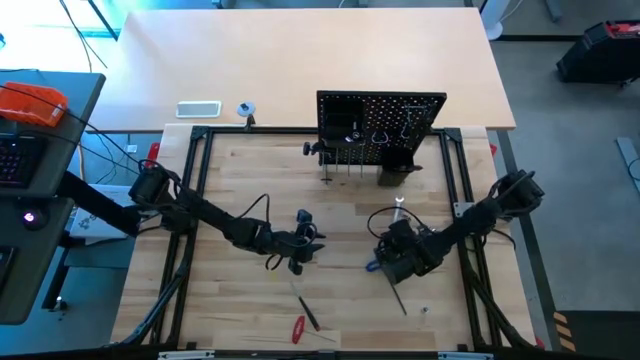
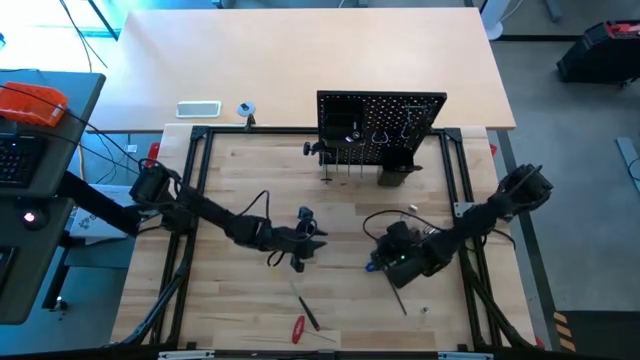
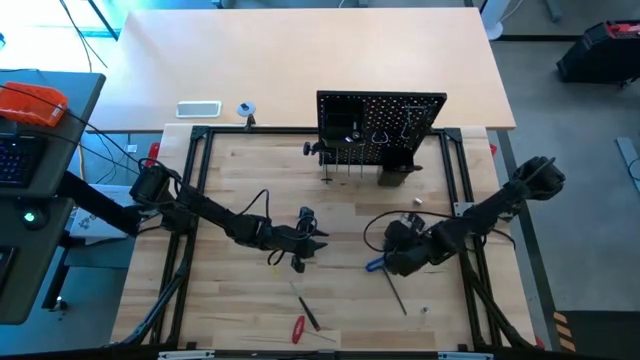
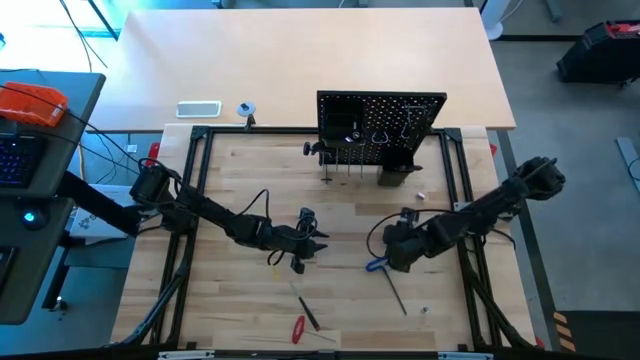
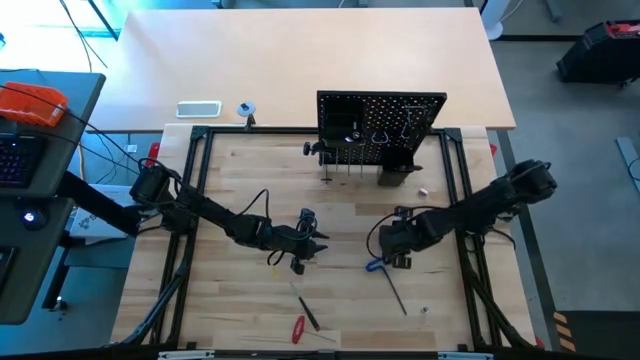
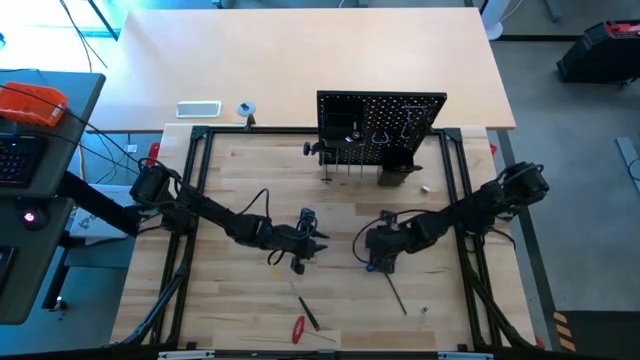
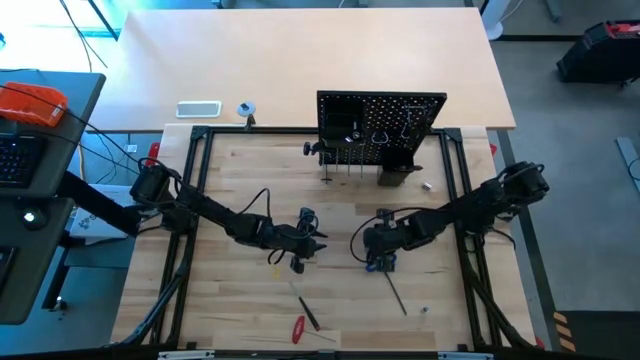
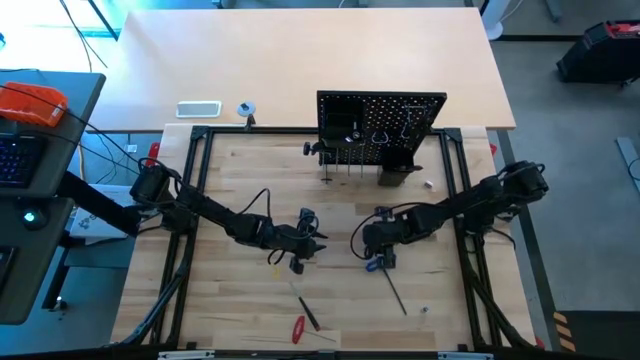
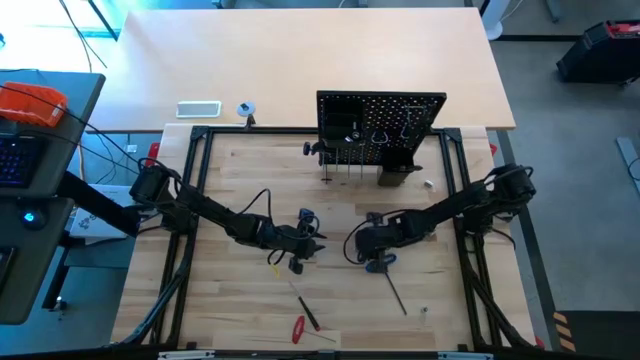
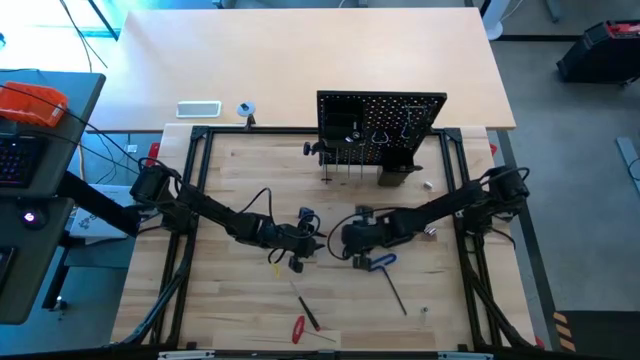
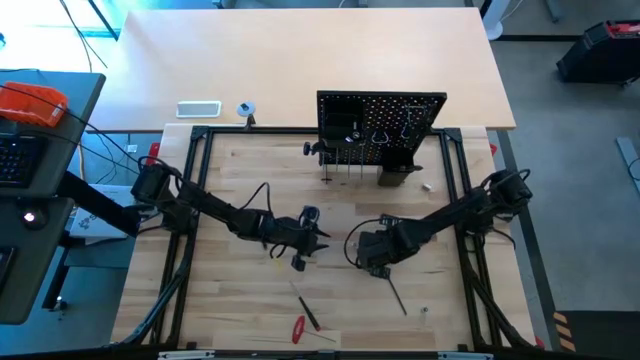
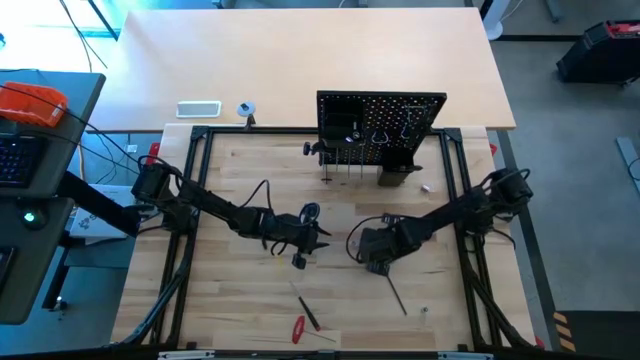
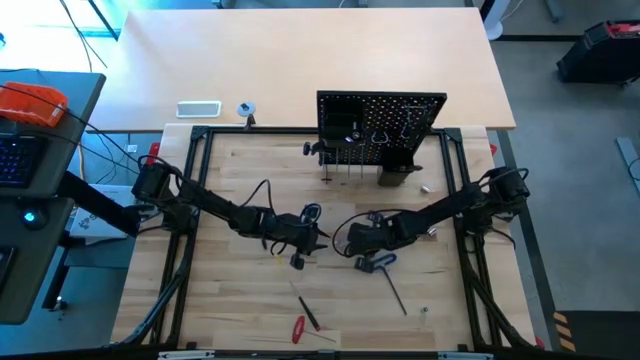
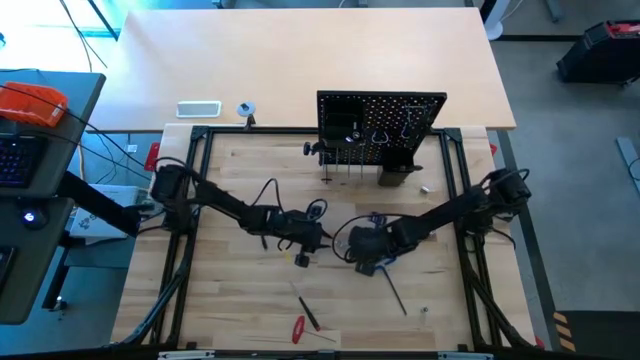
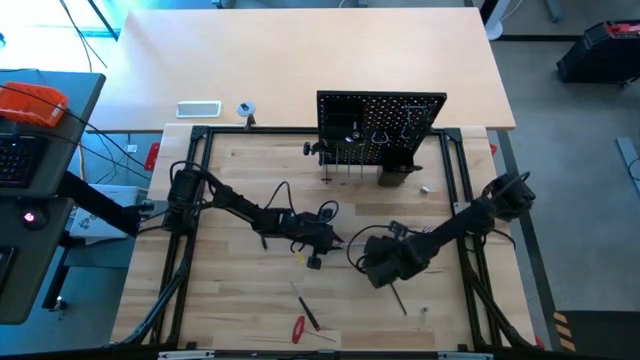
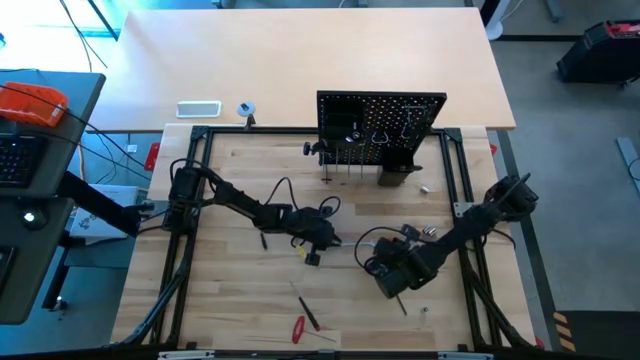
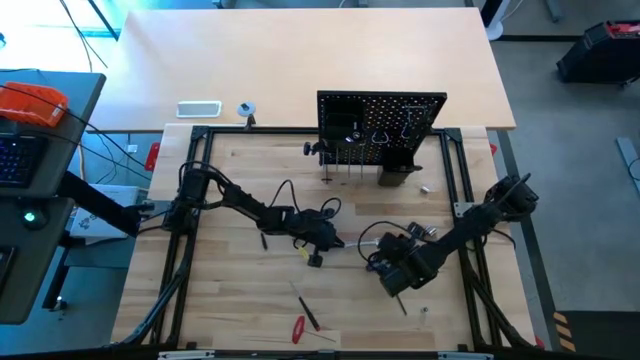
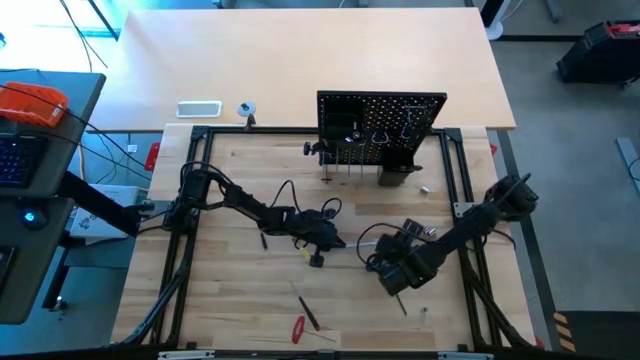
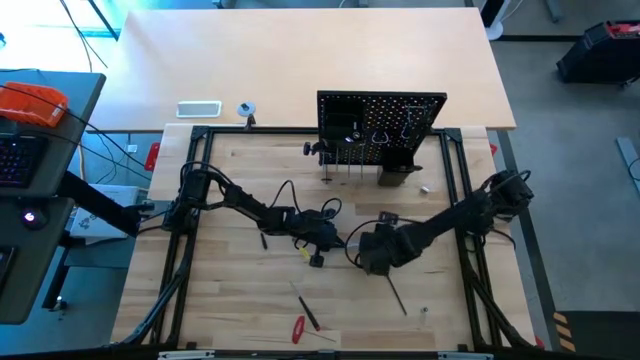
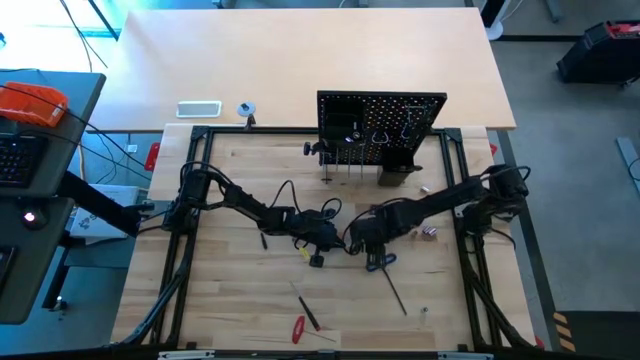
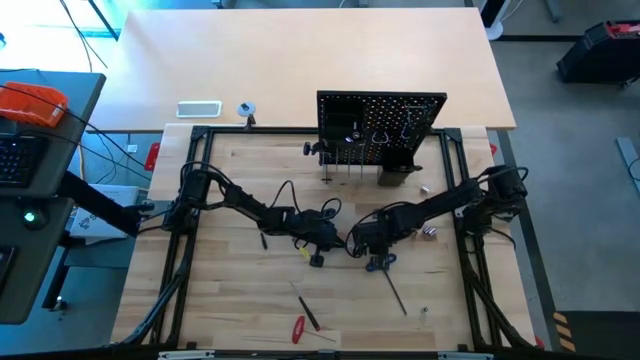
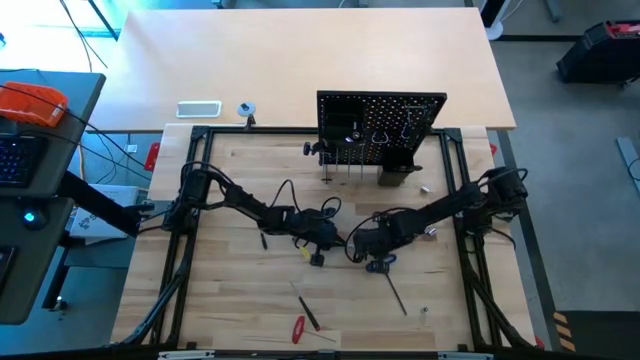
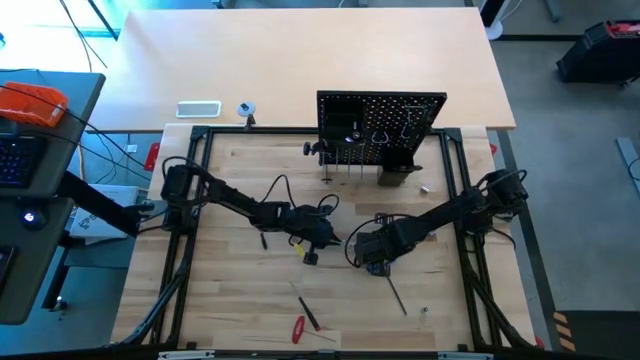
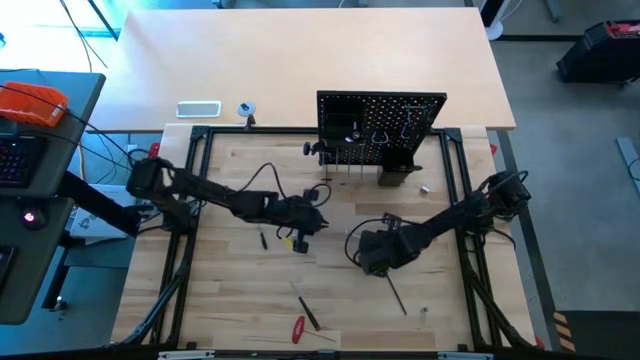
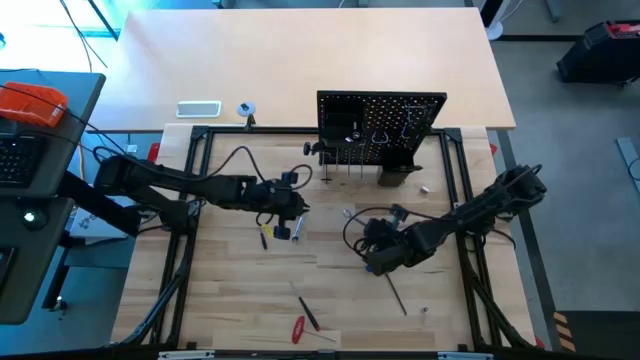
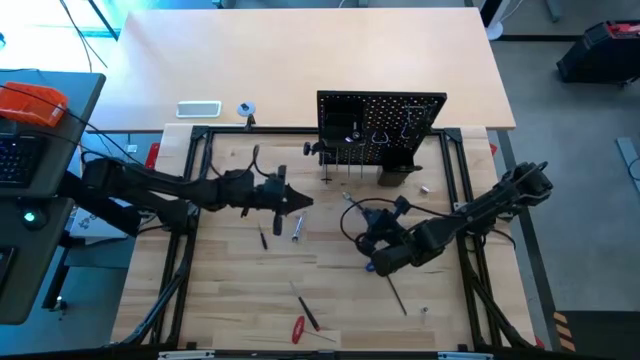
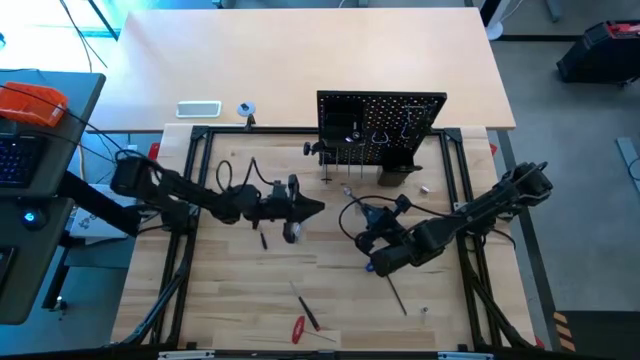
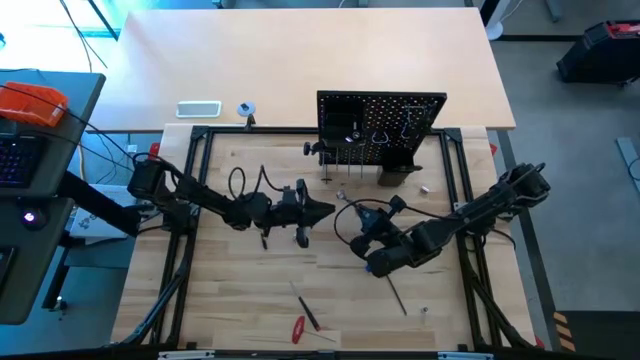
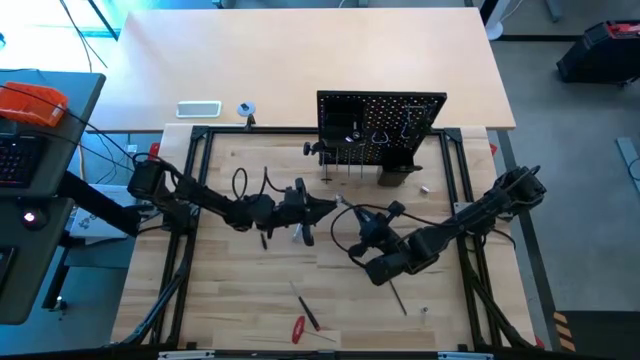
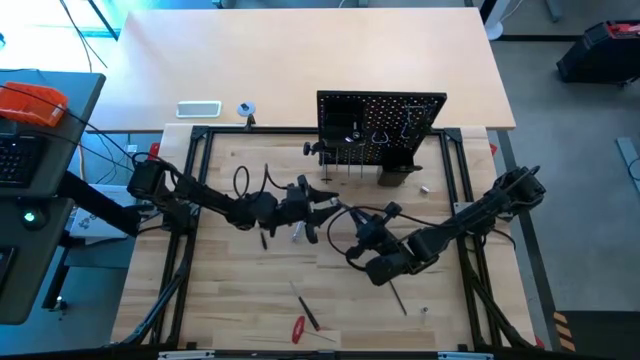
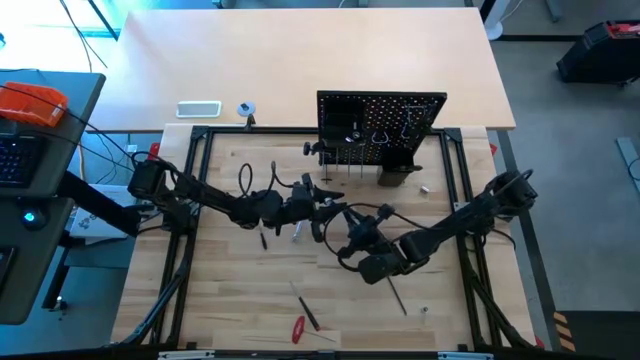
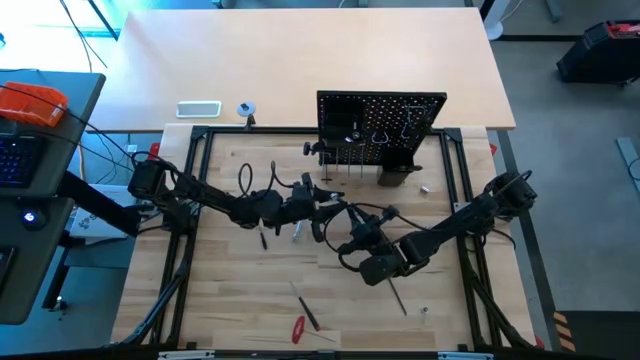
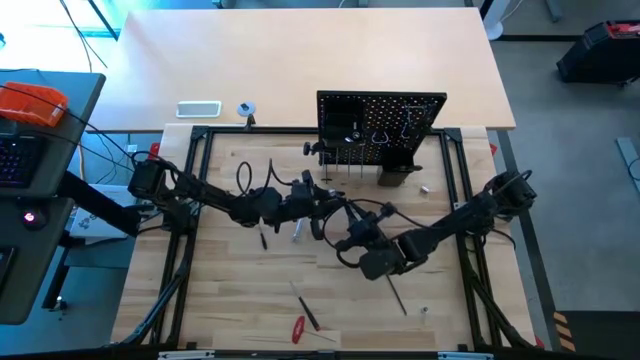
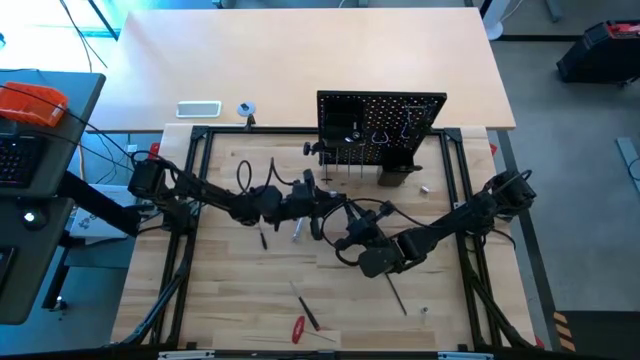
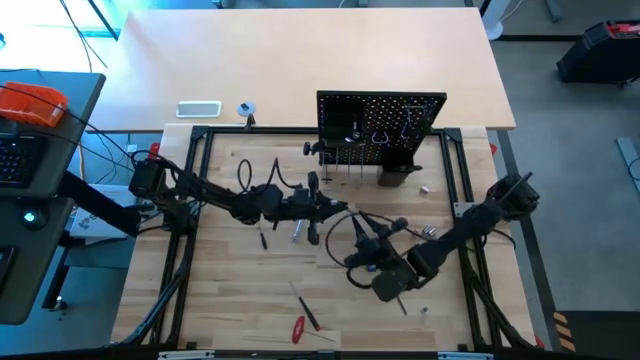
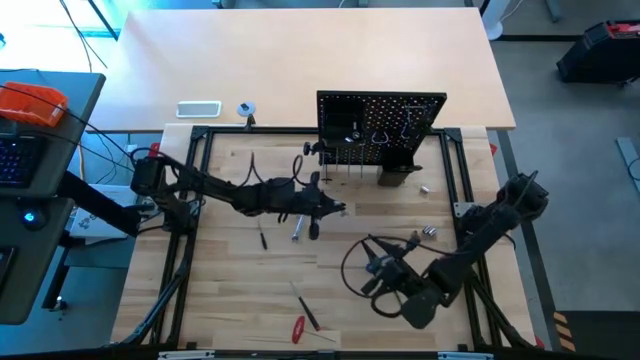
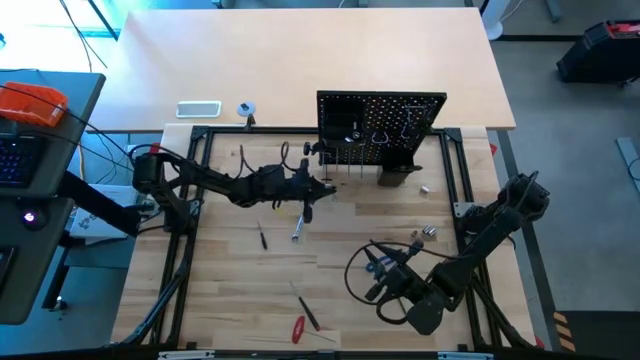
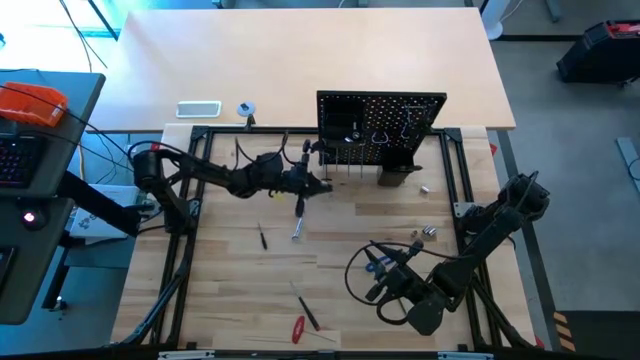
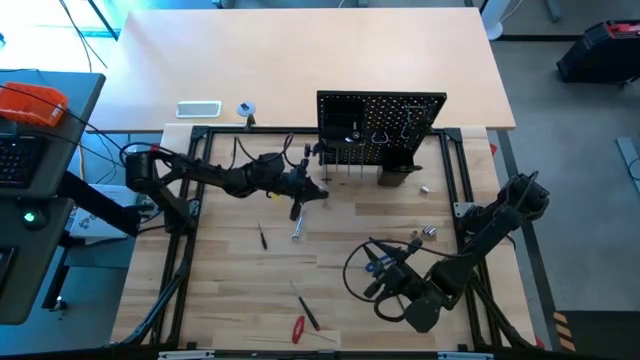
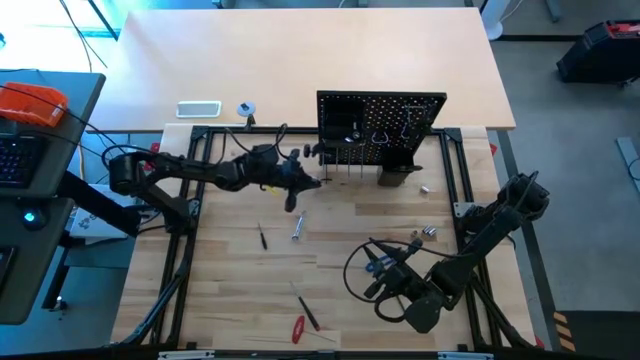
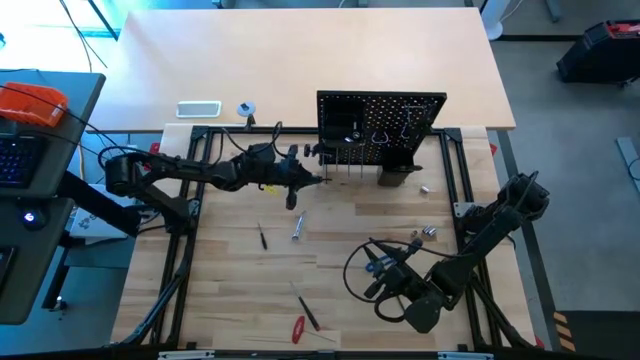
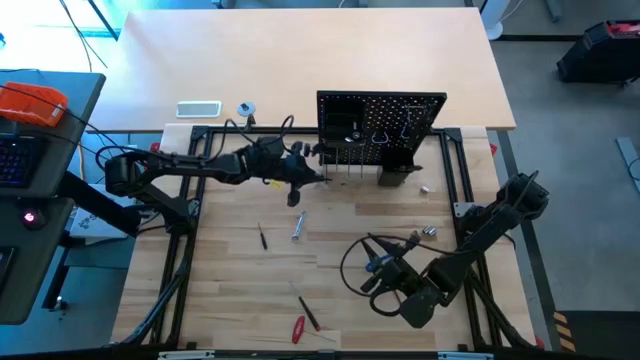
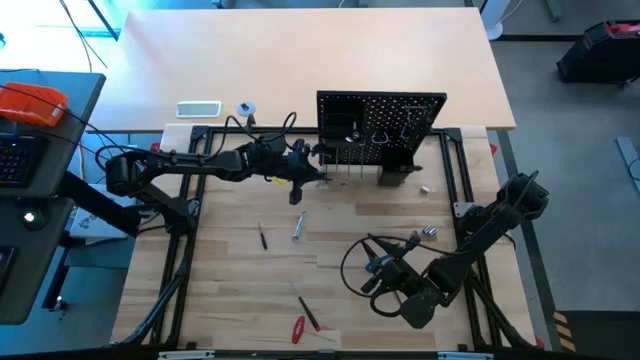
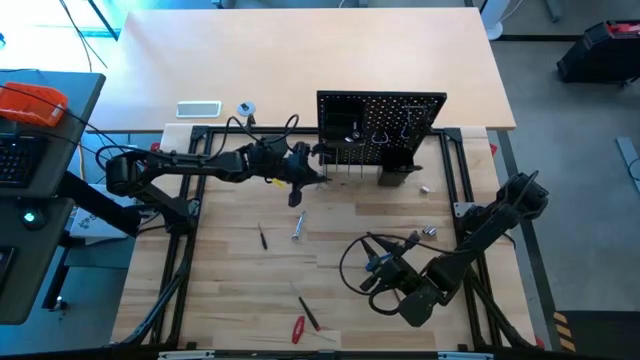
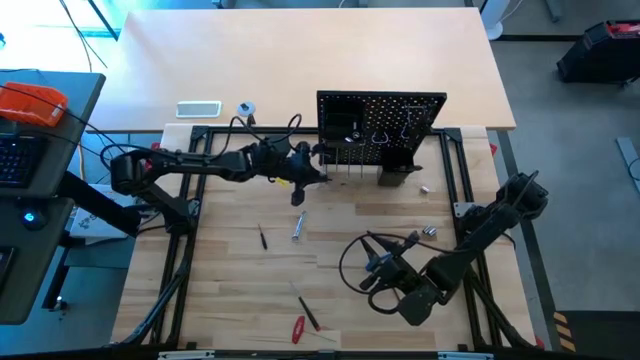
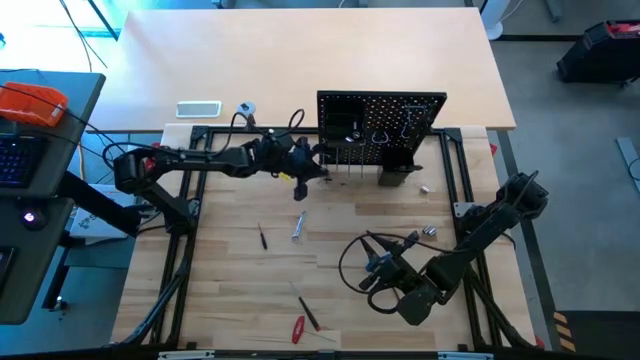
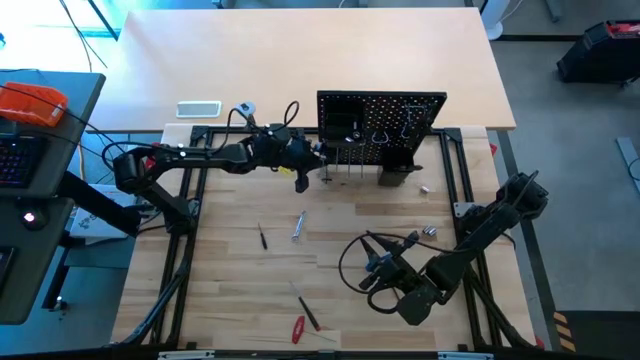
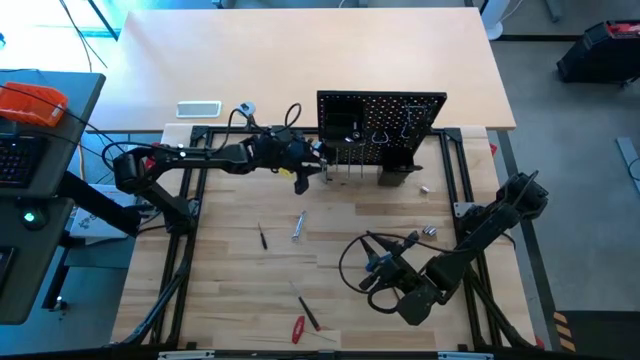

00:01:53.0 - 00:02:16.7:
Task: Hang tools onto peg board
Hang the silver combination wrench onto the pegboard
